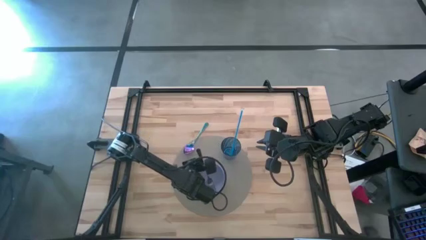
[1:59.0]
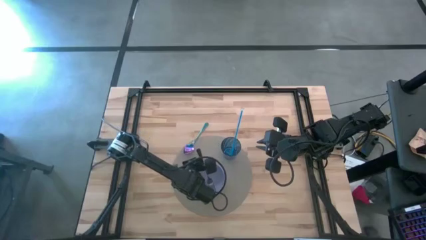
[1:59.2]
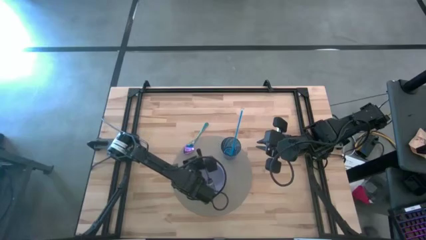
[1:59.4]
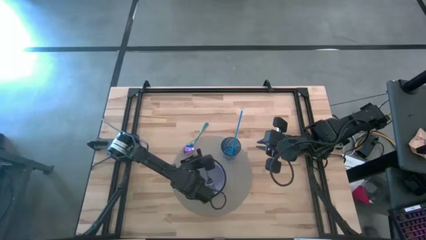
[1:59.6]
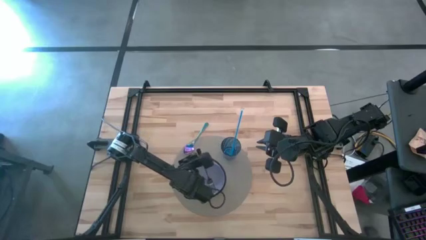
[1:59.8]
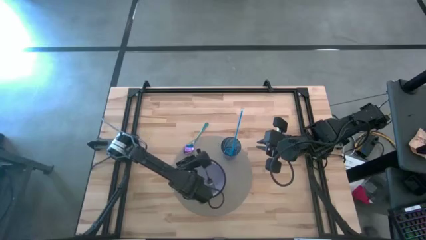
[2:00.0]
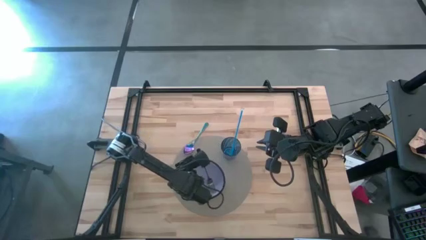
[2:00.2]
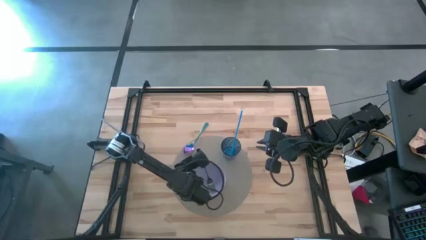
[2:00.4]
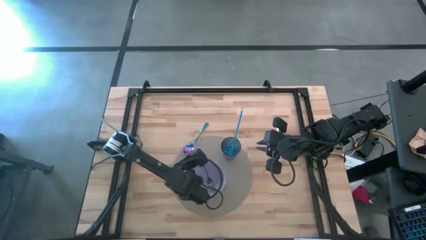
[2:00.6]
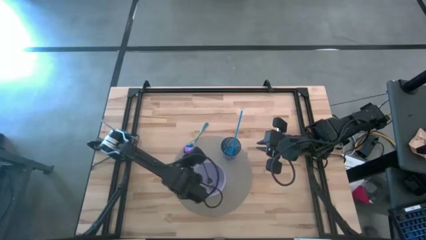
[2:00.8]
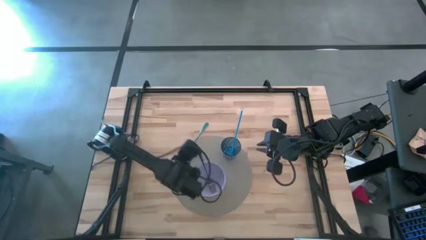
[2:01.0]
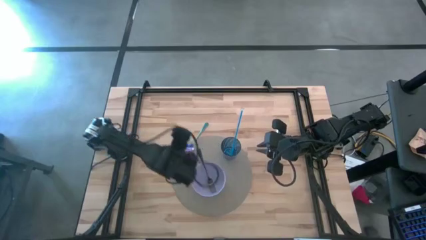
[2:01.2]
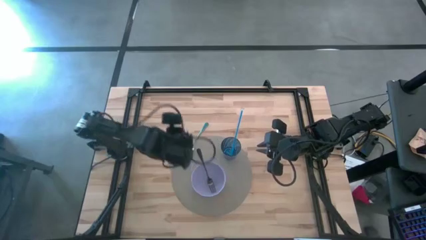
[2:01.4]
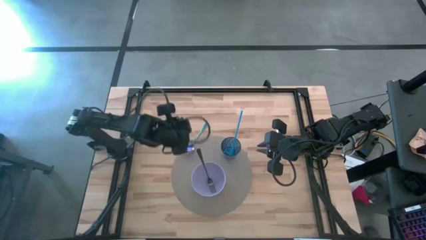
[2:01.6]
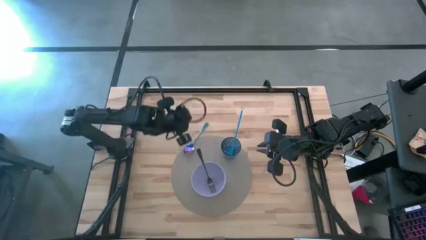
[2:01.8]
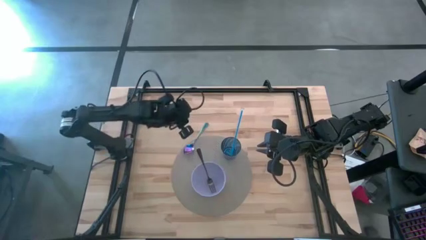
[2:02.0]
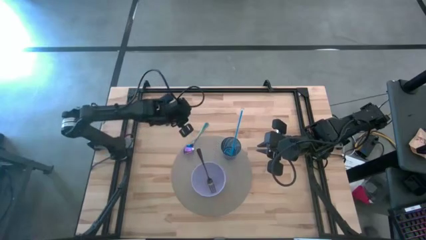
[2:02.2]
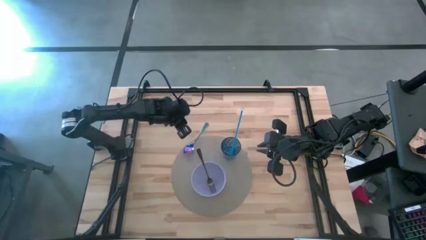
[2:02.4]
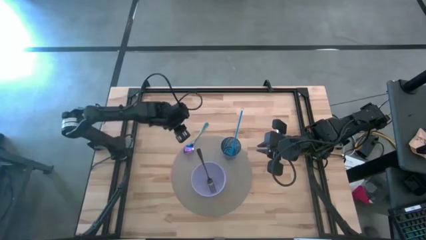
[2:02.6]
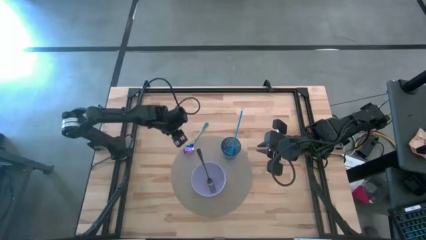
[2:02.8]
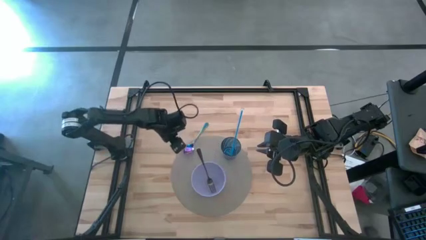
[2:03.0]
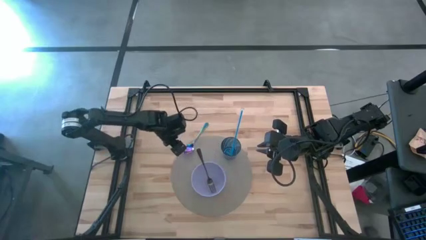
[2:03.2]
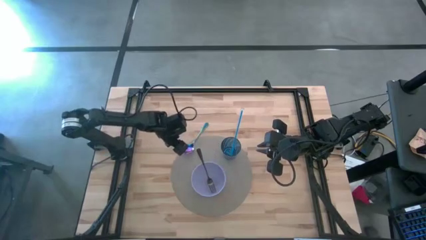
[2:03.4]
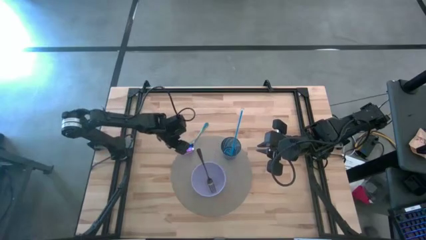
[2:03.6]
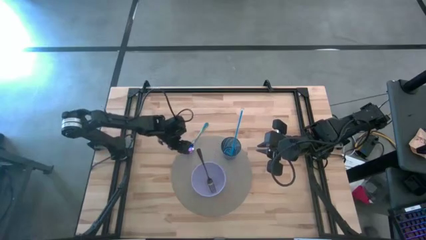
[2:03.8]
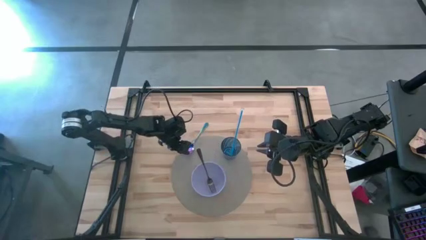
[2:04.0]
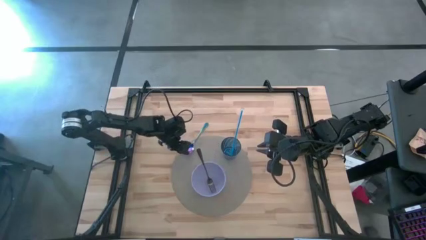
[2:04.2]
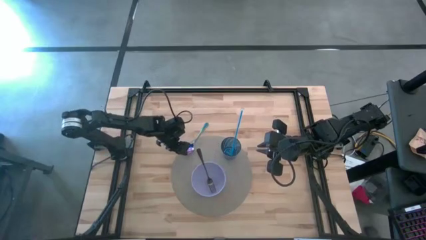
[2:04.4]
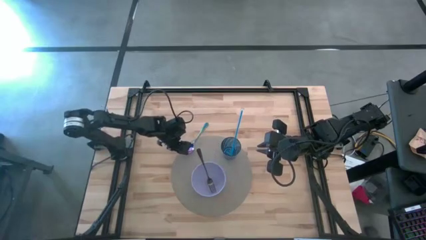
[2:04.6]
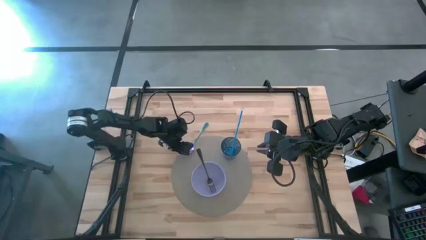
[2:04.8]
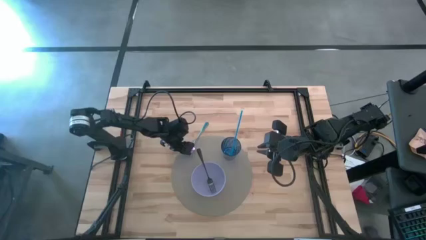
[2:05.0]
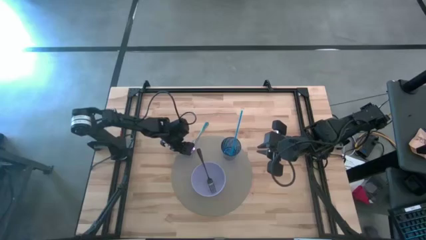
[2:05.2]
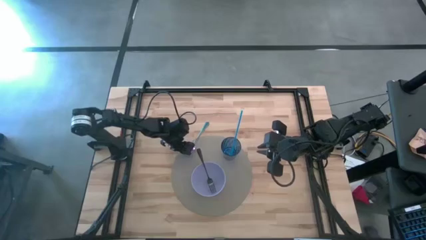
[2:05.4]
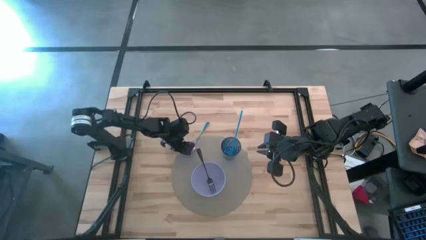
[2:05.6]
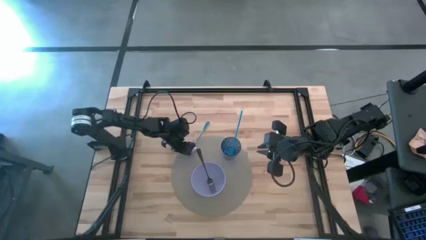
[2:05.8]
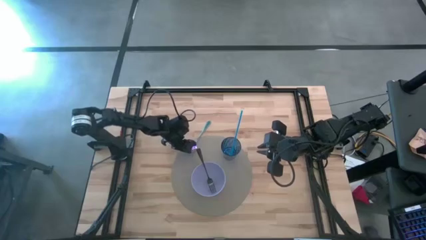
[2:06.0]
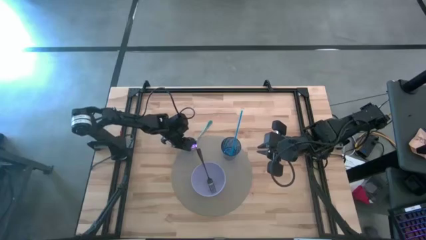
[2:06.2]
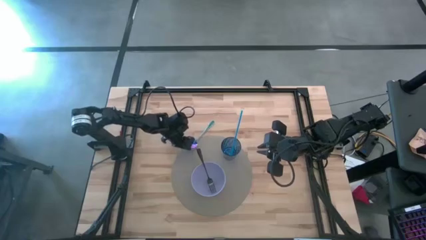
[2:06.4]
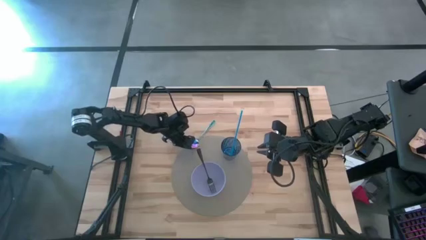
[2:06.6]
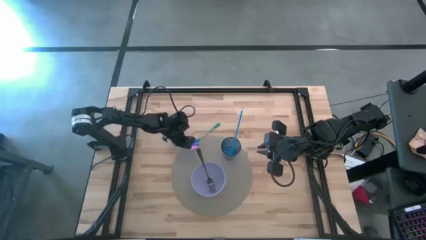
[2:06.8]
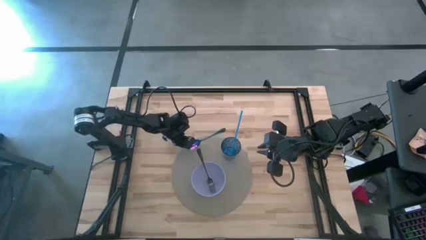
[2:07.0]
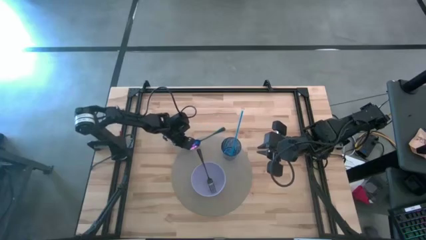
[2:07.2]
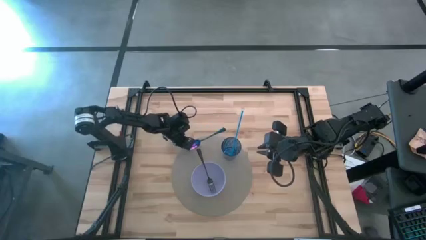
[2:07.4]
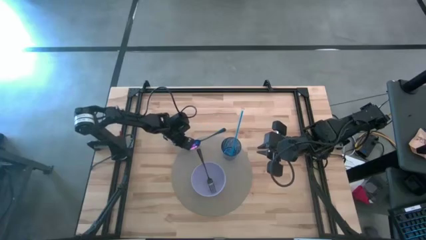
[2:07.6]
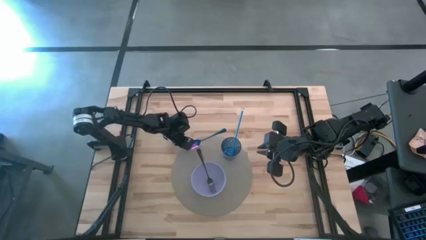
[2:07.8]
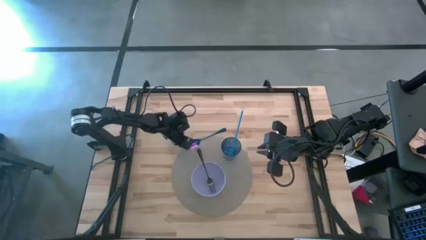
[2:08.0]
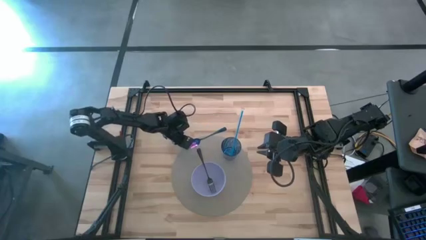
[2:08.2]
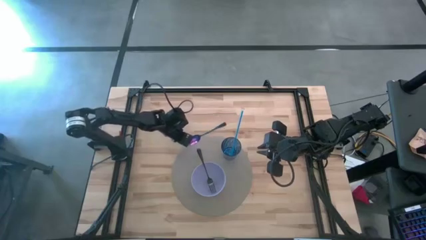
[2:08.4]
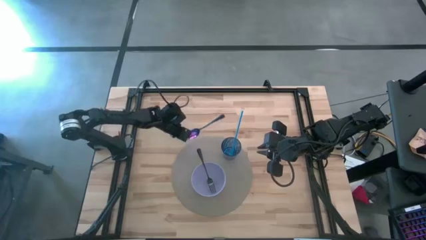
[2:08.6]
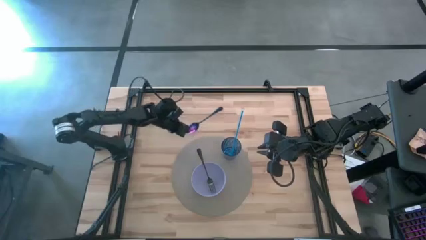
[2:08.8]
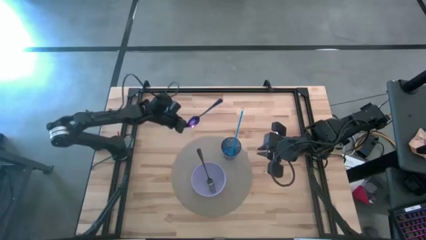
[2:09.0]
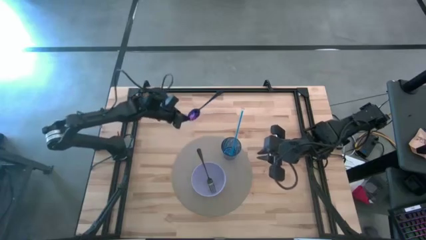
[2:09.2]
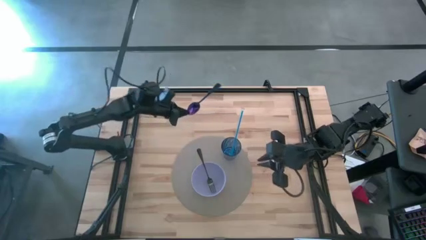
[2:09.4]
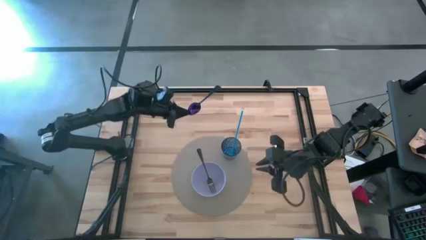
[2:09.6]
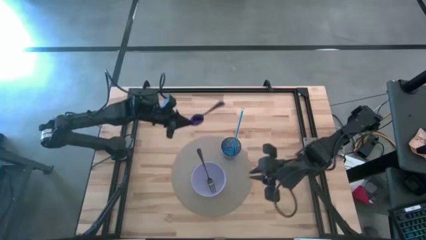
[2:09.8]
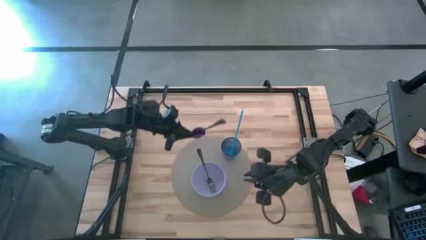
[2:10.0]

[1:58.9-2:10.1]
Task: Pick & Place Utensil
Put the spoon into the bowl

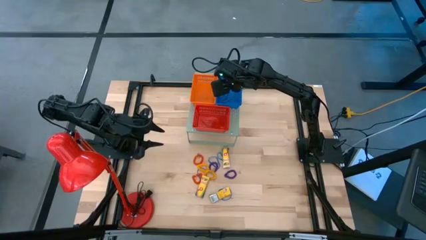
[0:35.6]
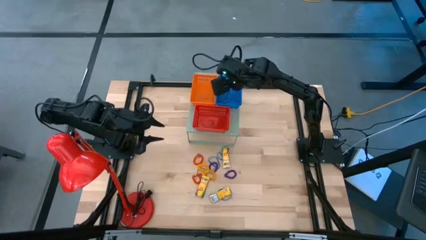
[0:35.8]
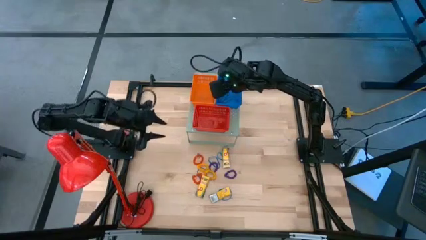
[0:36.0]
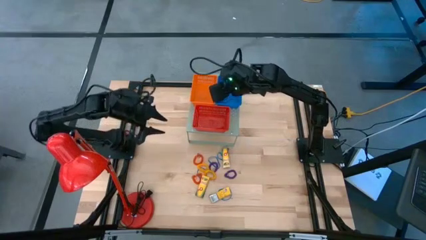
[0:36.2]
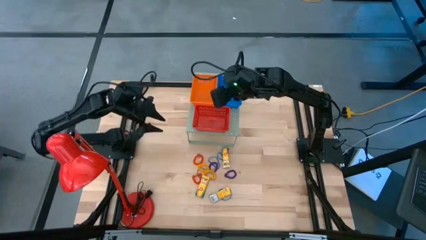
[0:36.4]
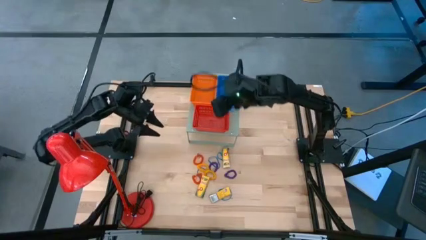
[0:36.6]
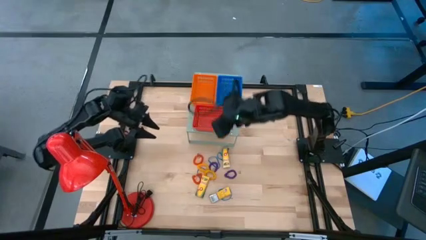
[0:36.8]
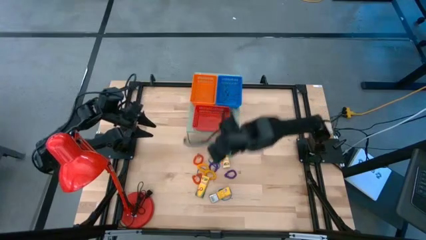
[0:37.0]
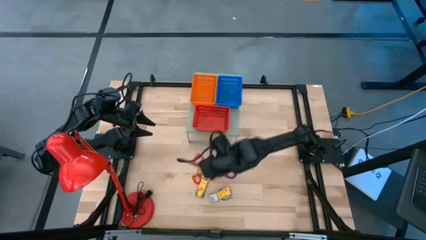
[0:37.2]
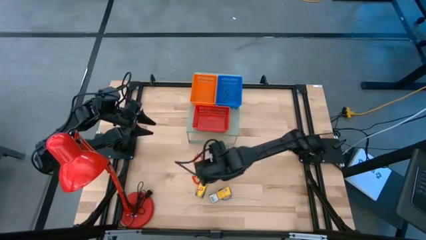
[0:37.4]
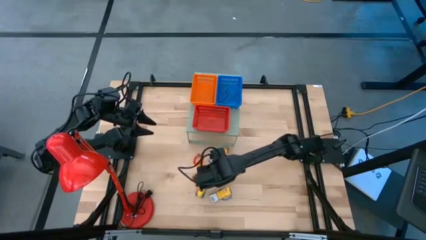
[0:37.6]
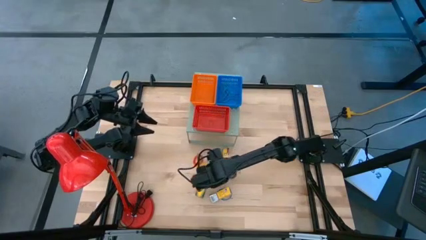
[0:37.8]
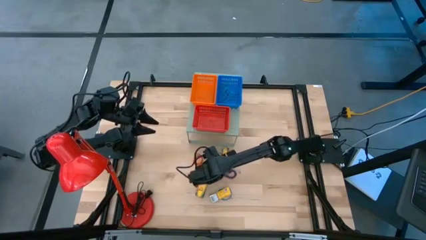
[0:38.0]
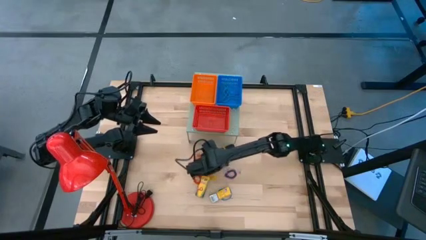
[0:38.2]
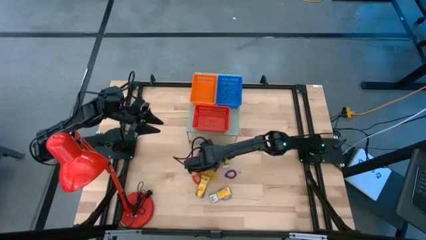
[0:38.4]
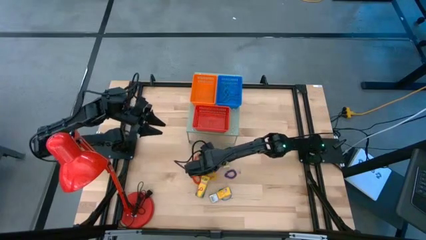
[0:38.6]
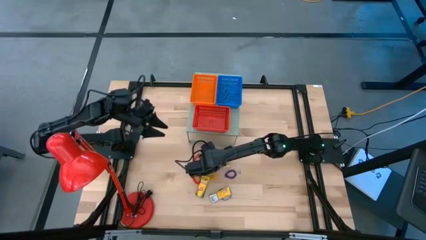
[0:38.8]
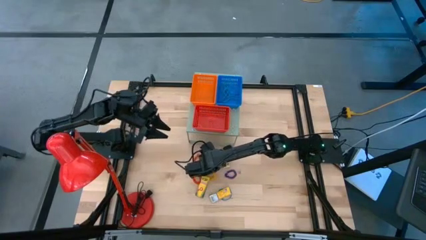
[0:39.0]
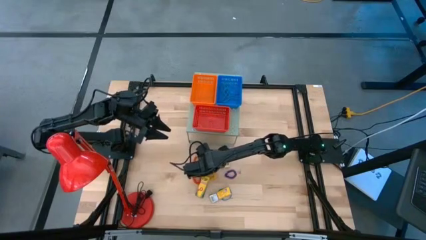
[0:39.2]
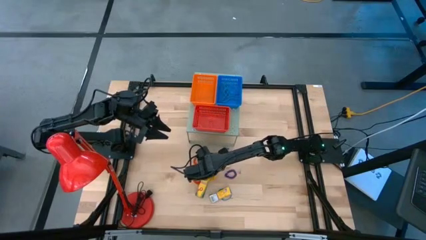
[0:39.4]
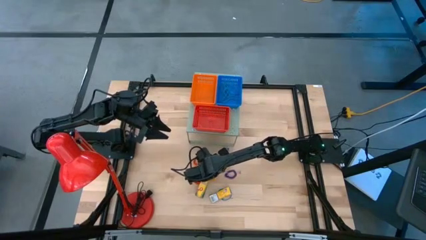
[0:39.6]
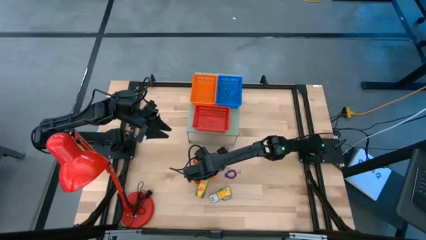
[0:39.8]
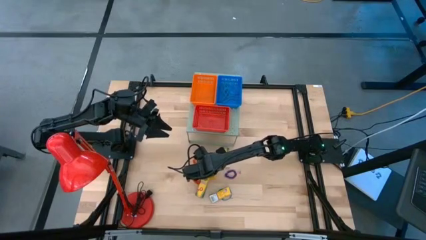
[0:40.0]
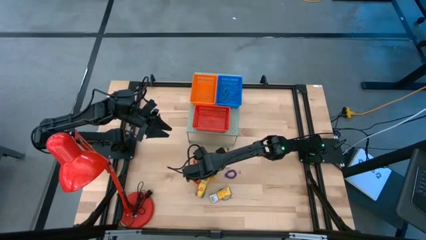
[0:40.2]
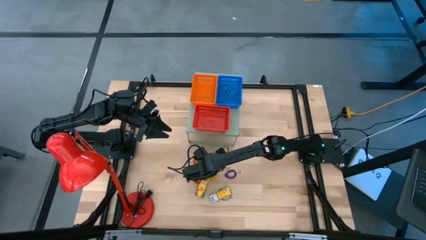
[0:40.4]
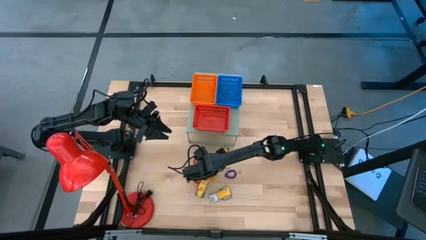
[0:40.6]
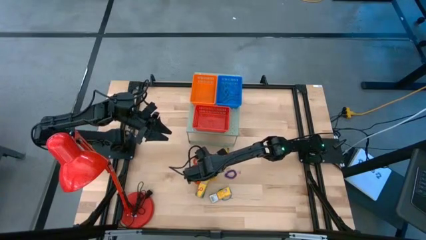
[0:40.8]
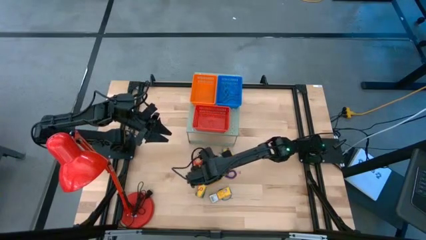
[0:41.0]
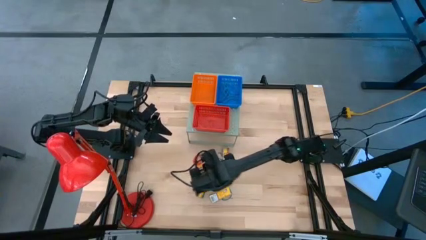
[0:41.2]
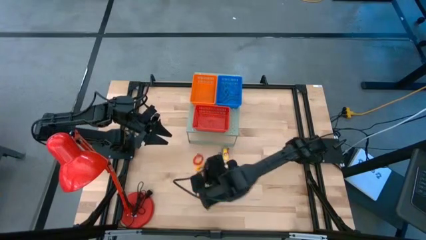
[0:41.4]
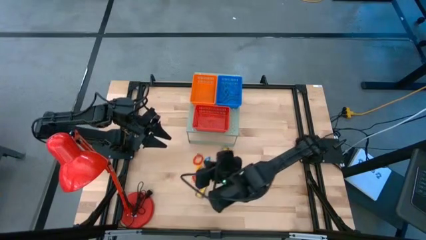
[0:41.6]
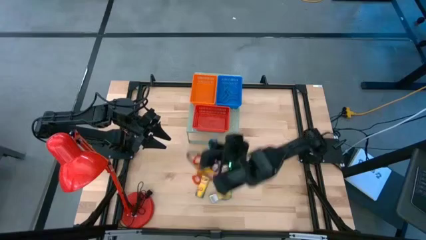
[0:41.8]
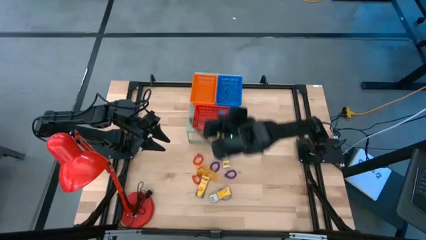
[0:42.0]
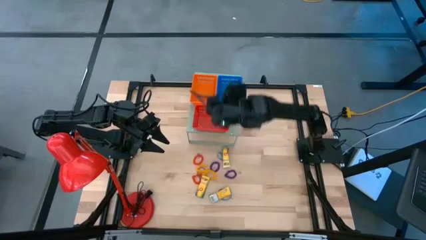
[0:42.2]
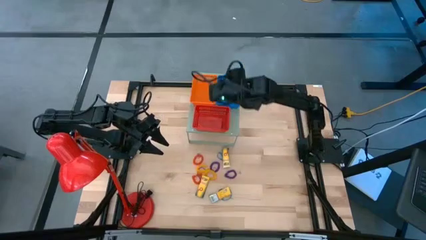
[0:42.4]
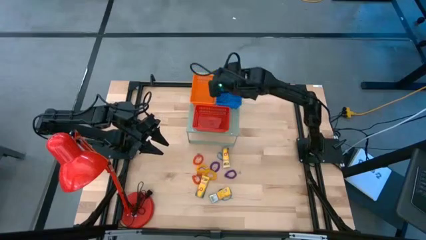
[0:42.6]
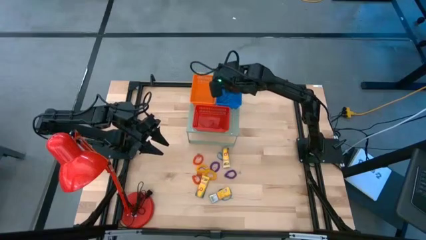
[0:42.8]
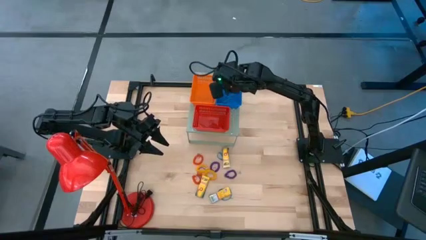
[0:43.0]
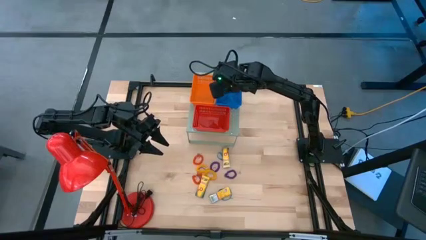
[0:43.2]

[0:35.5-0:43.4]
Task: Pick & Place Office Desk Supplies
Put the blue rubber band into the blue bin
